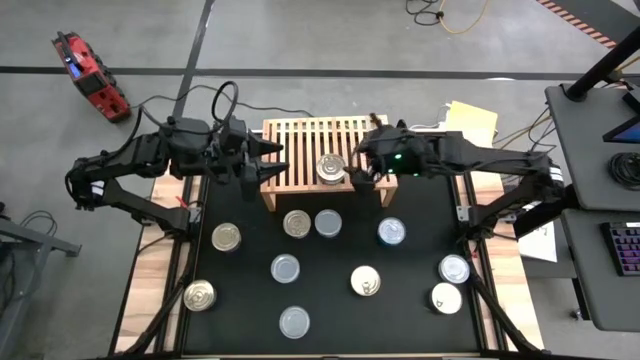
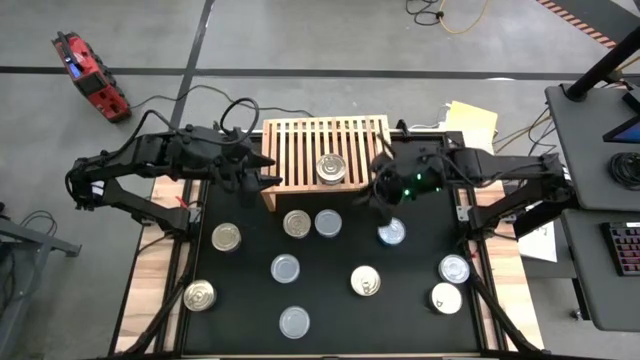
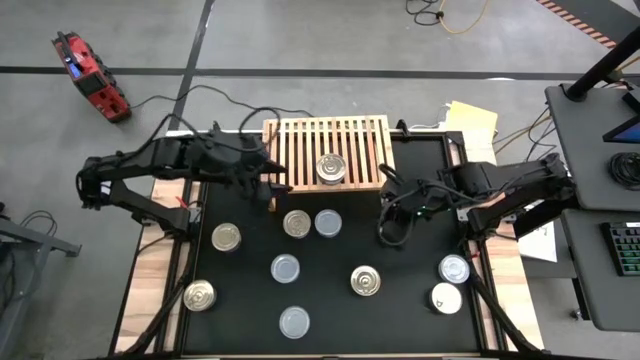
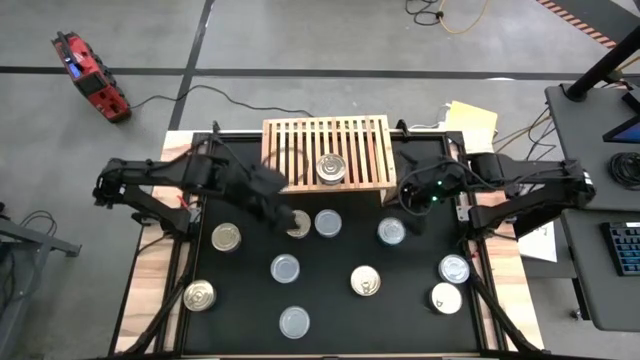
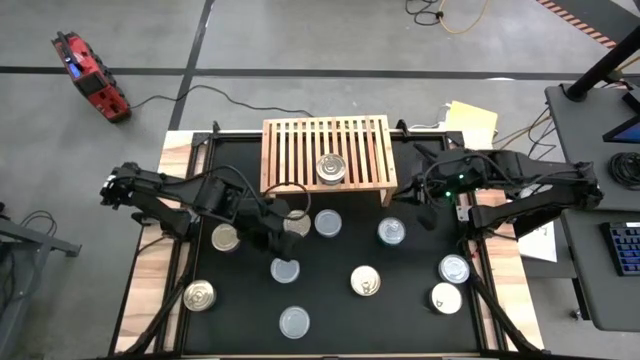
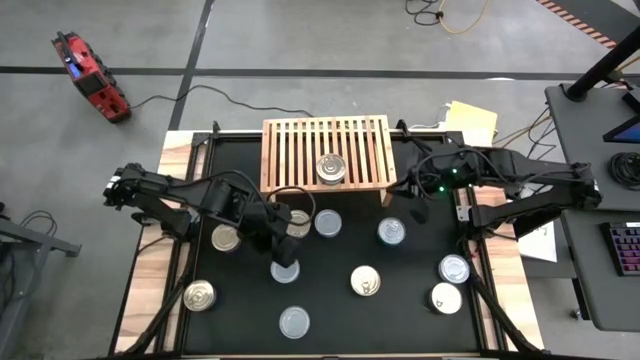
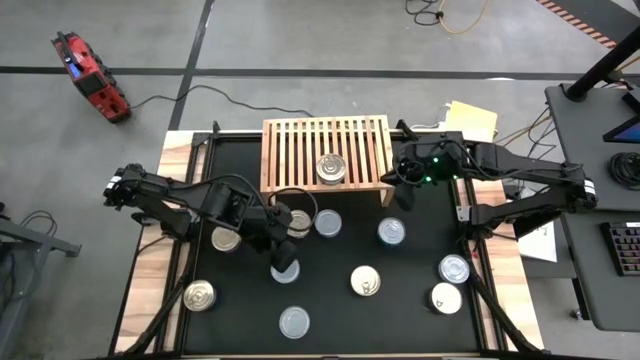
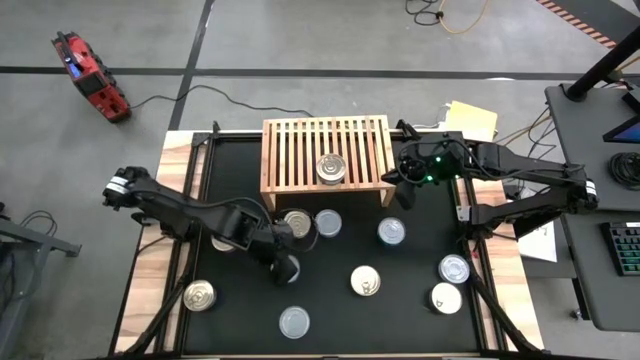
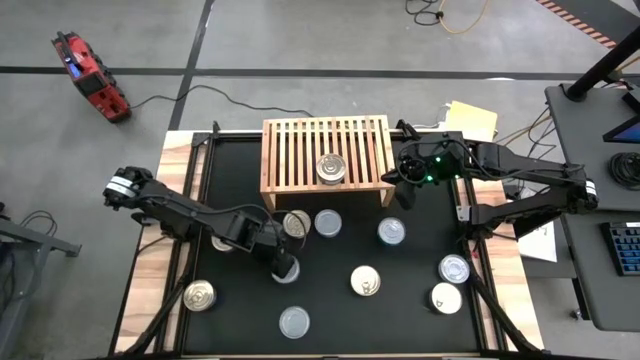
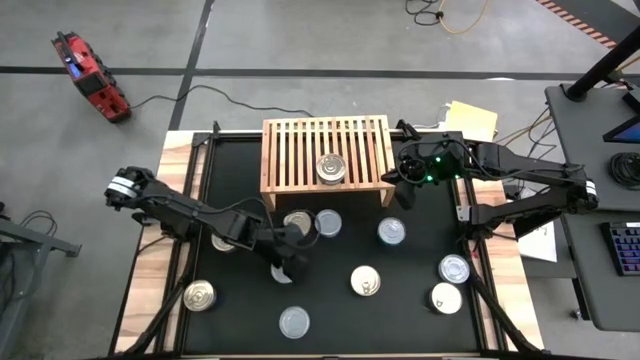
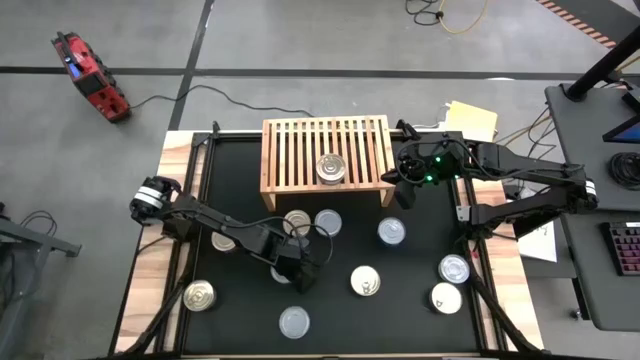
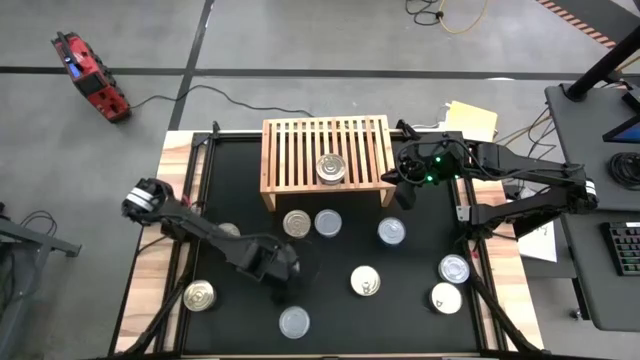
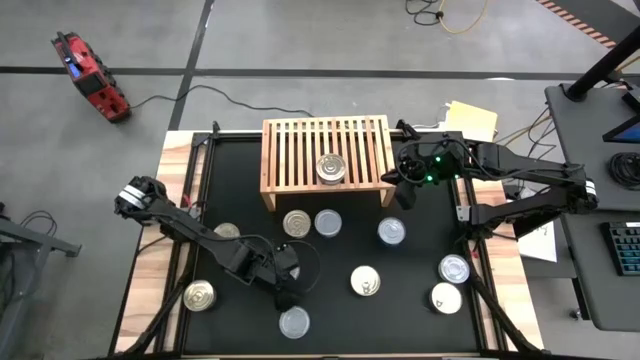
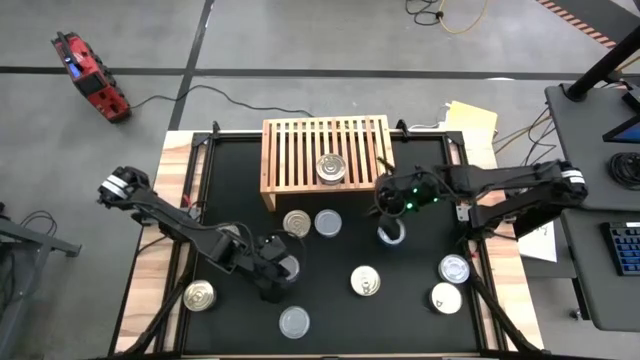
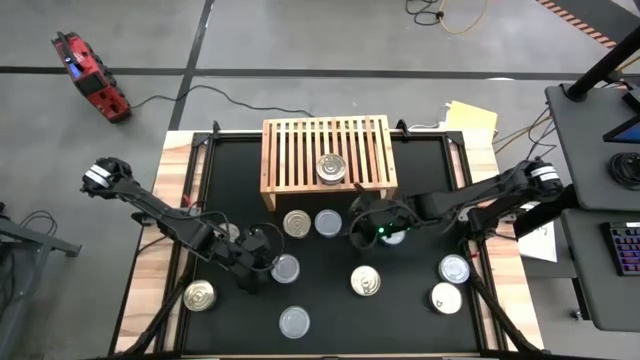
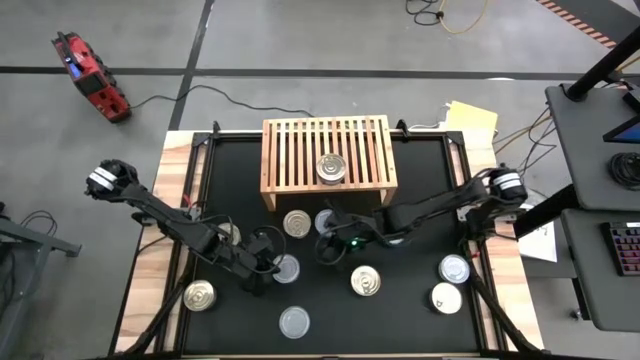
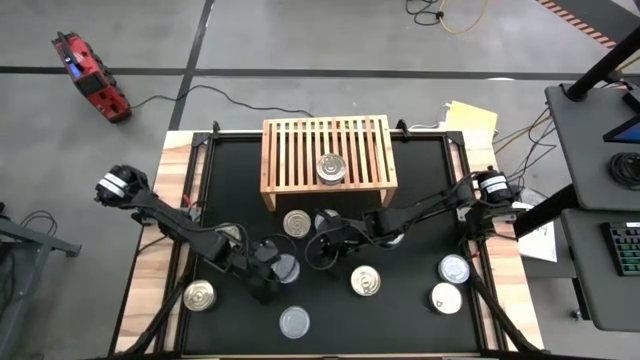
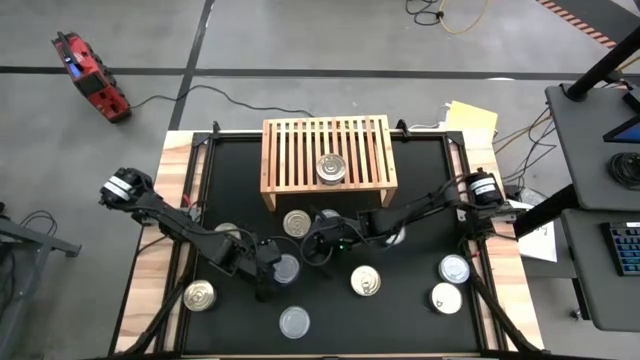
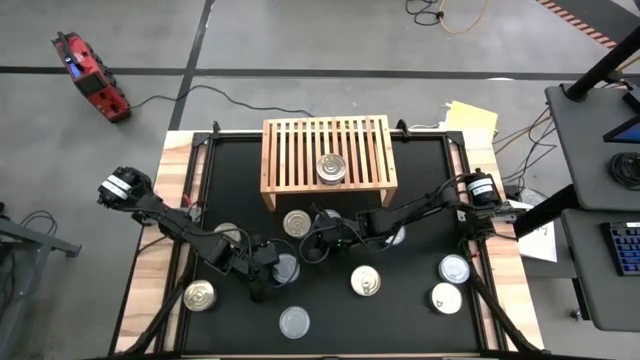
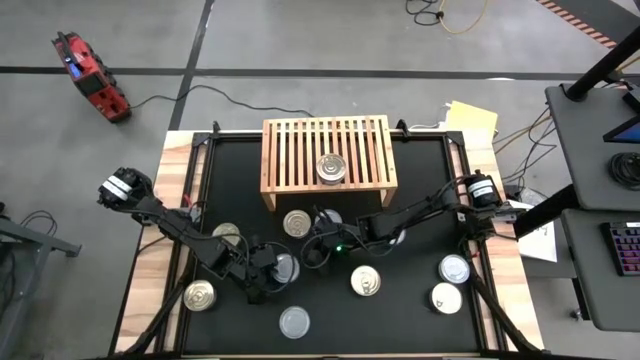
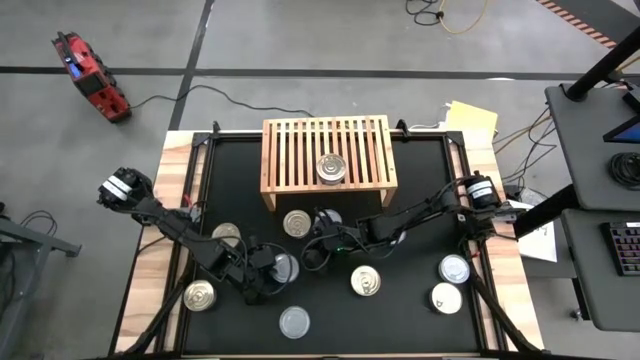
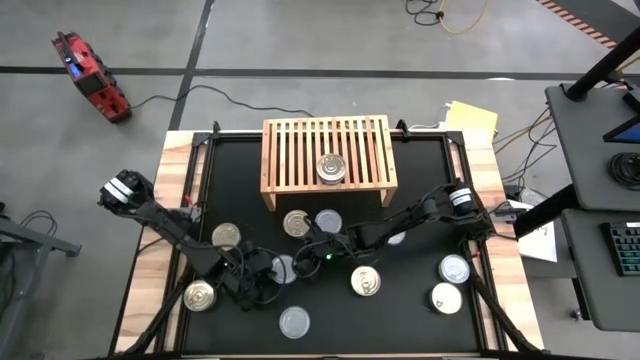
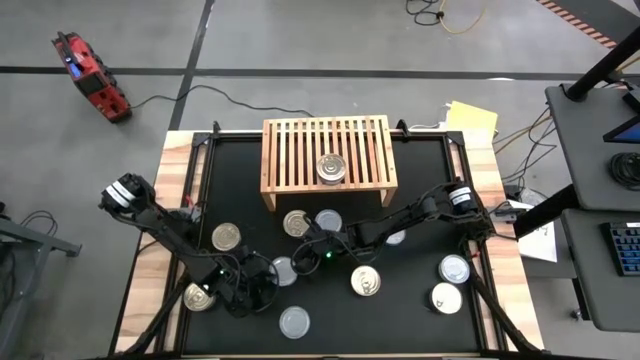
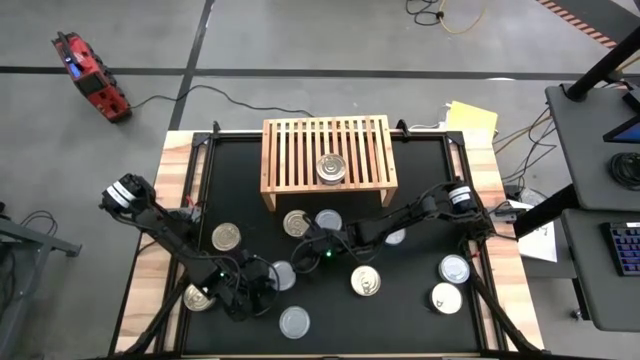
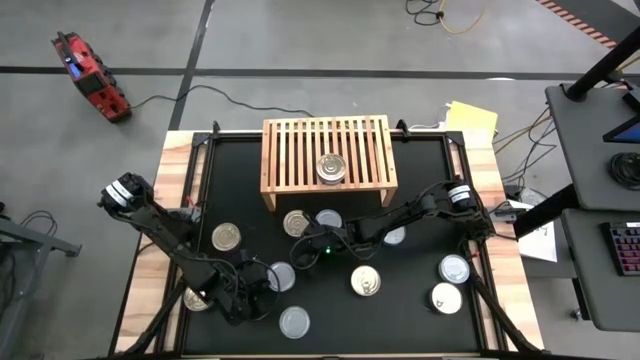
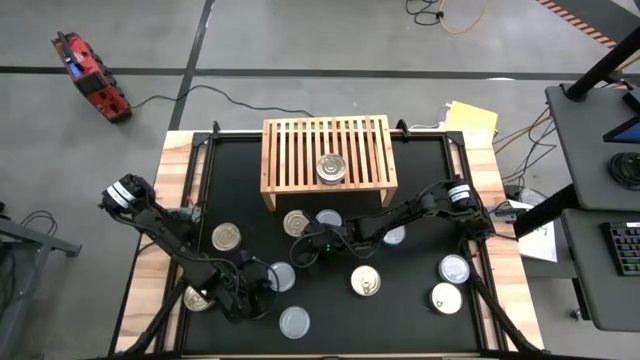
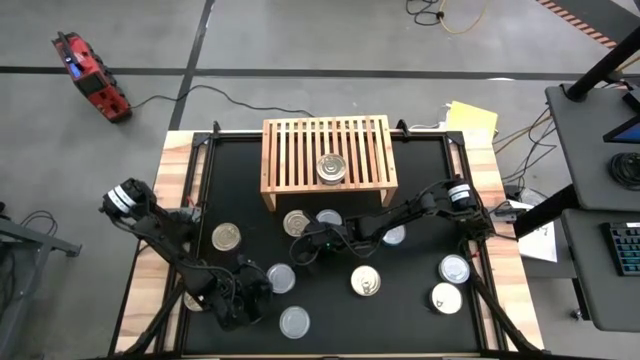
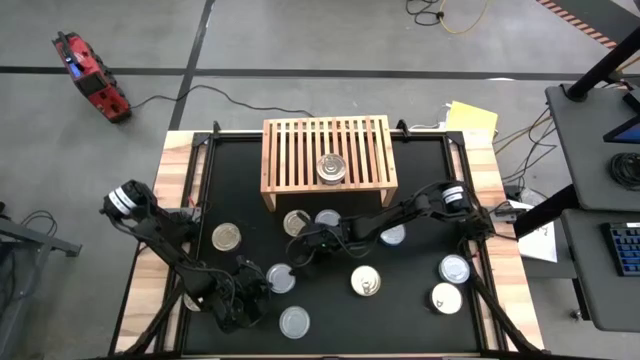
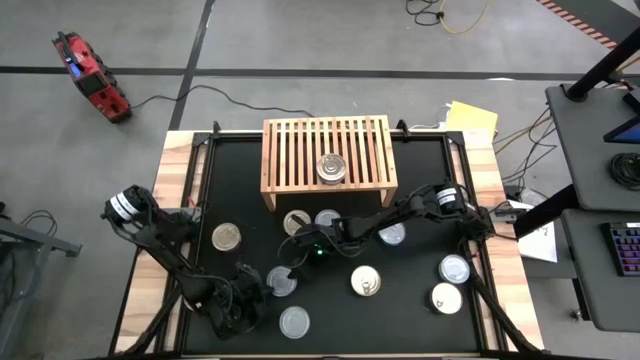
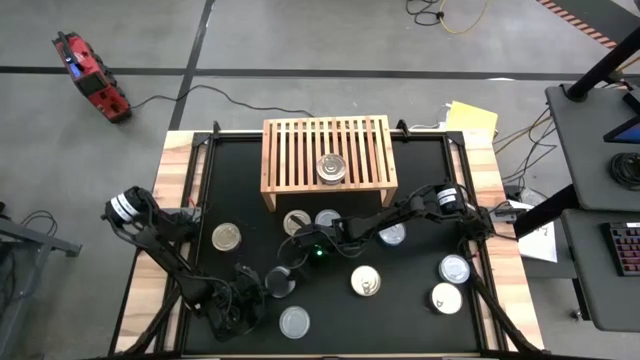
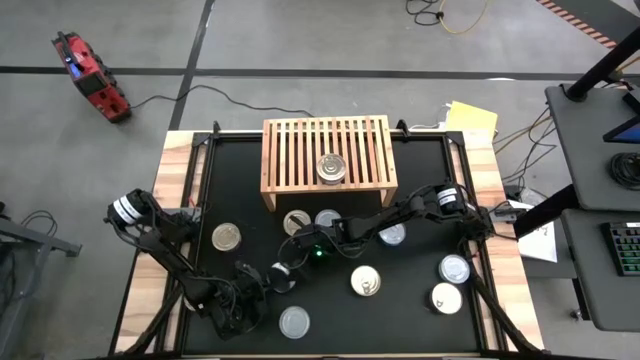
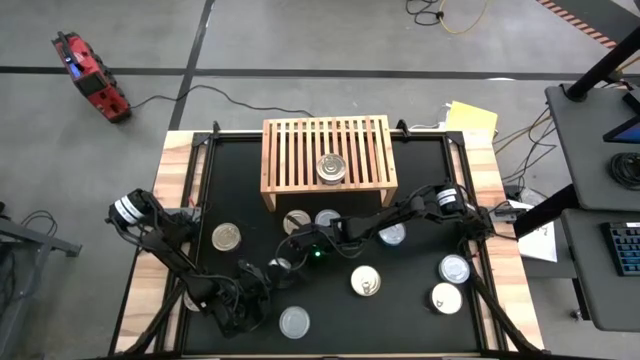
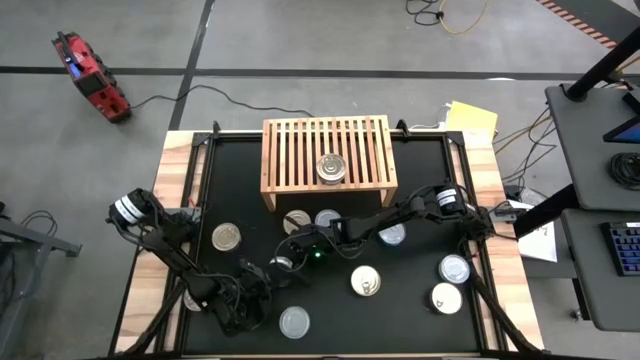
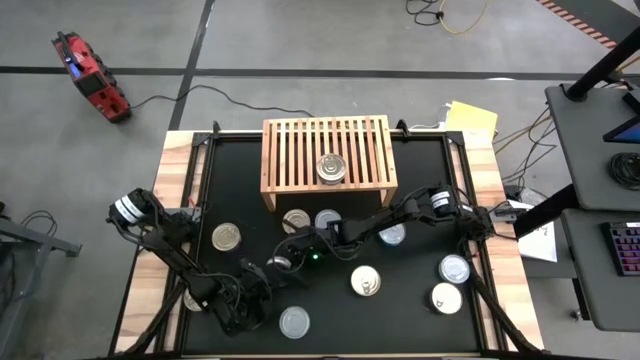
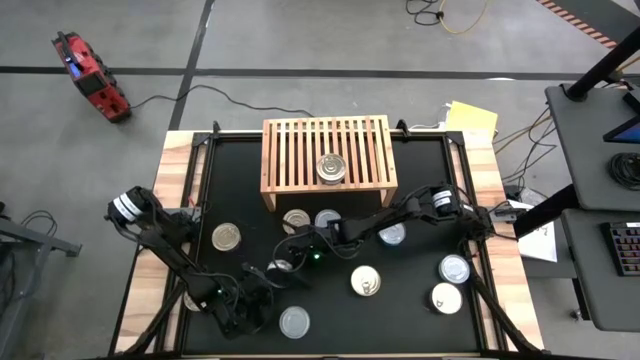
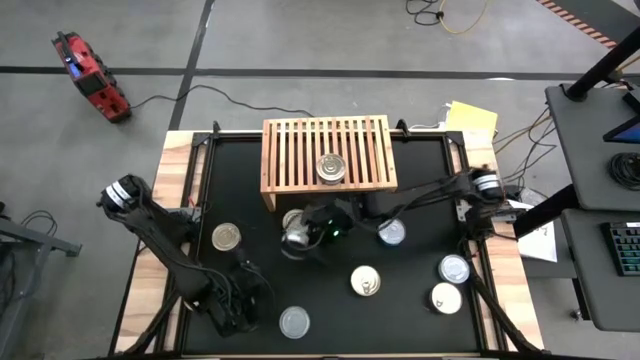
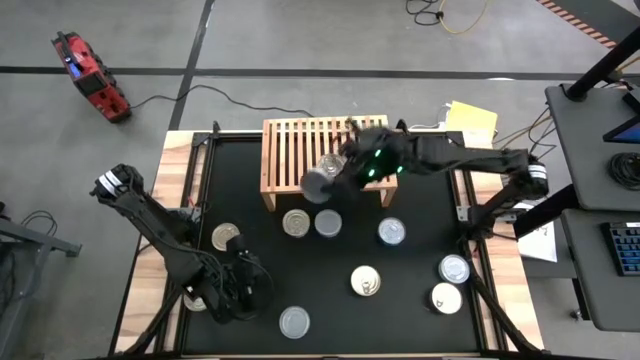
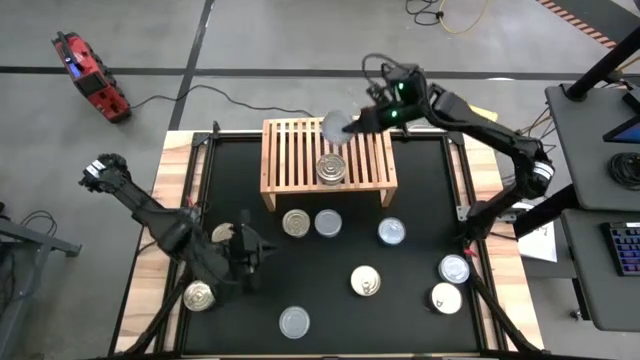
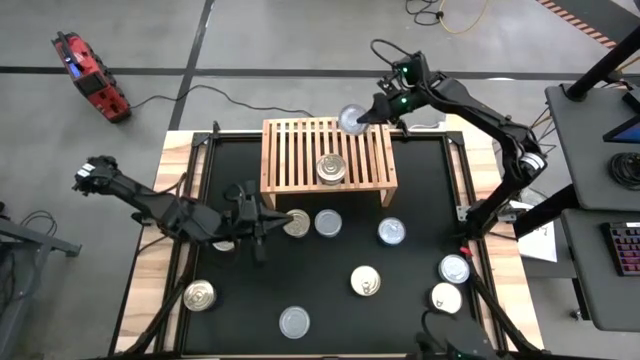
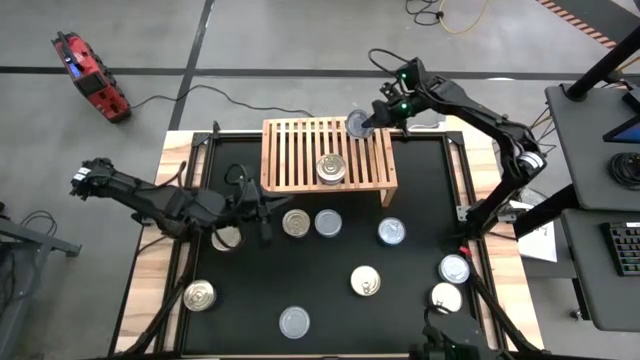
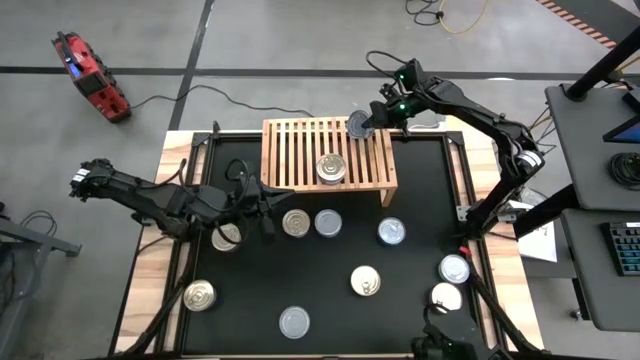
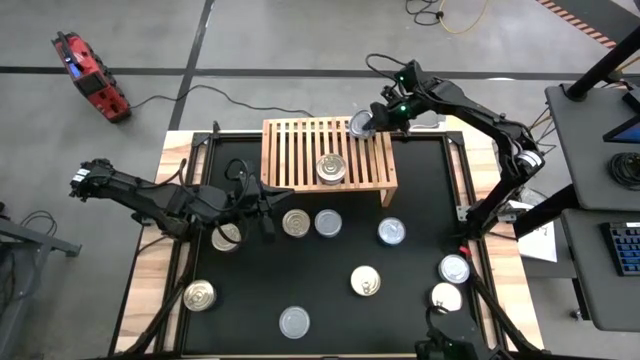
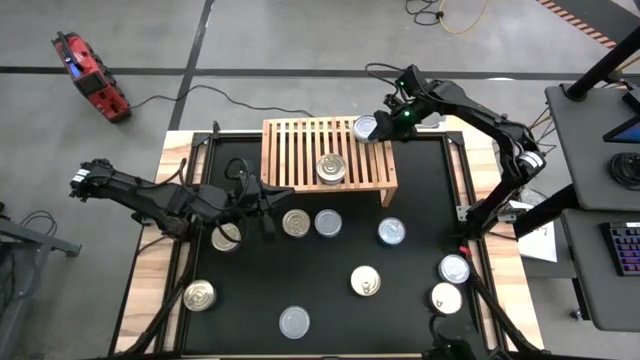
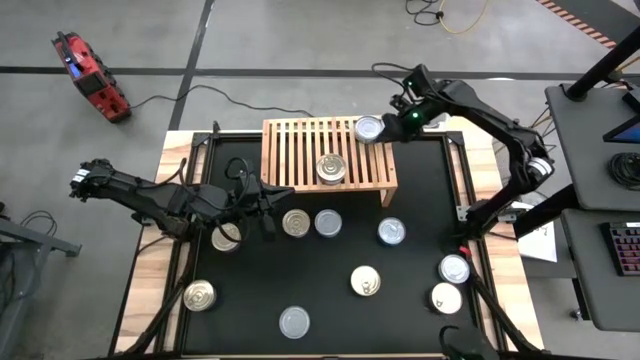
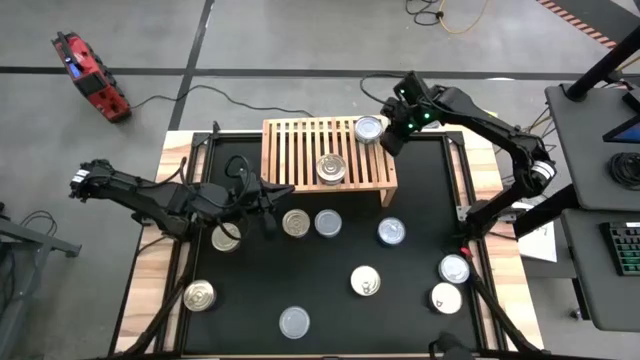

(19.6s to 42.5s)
Task: Stack canned seafood by type on shelf
Put the green white tuna can on the shelf
